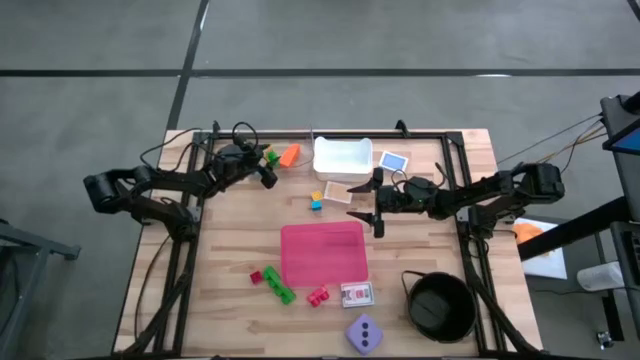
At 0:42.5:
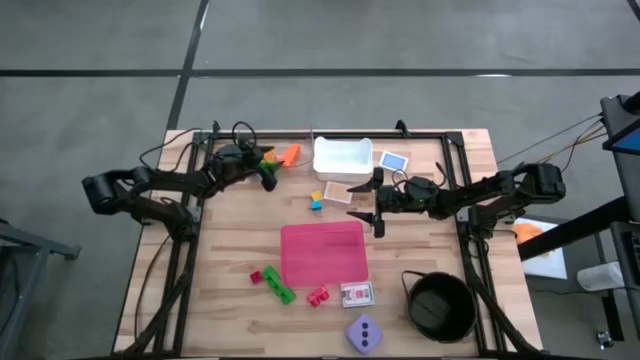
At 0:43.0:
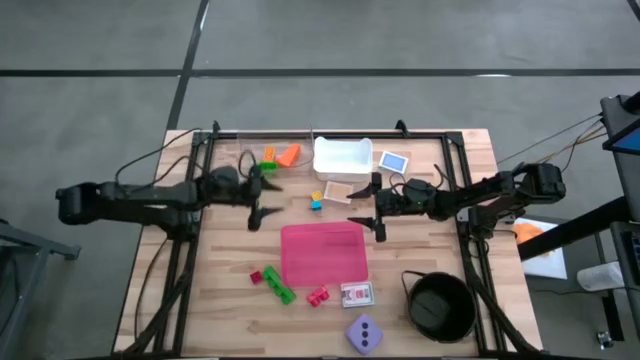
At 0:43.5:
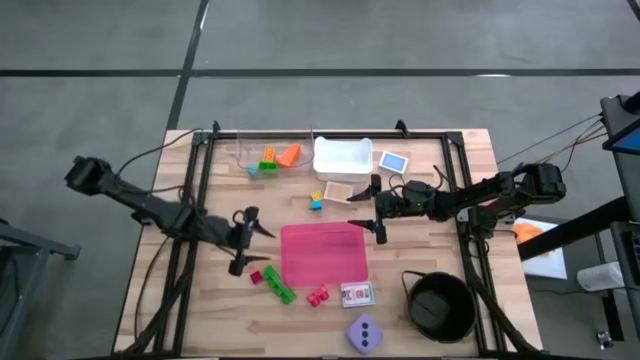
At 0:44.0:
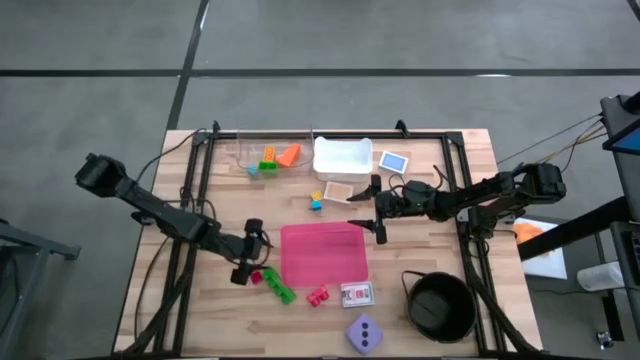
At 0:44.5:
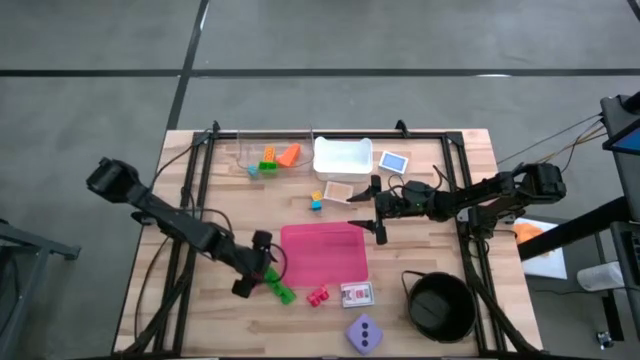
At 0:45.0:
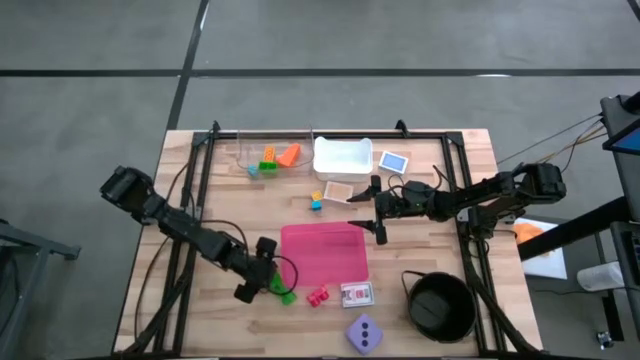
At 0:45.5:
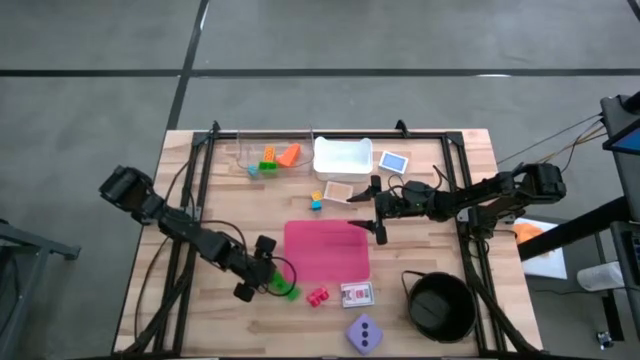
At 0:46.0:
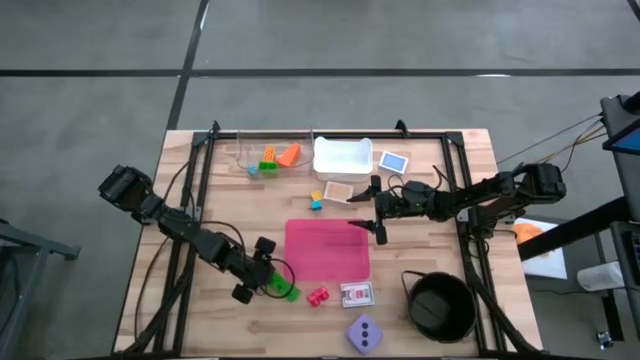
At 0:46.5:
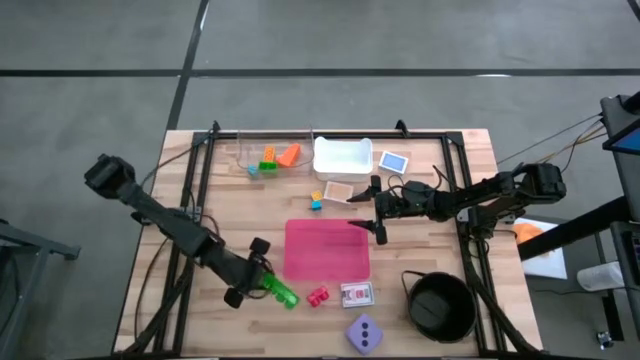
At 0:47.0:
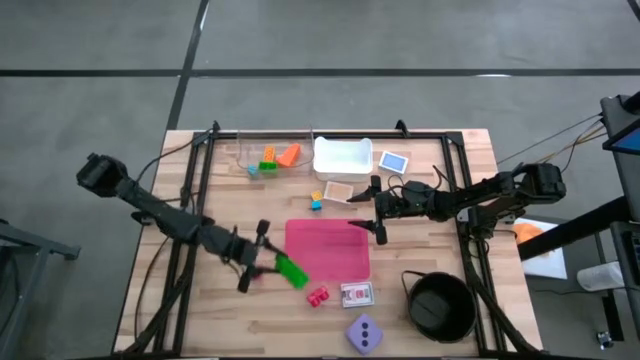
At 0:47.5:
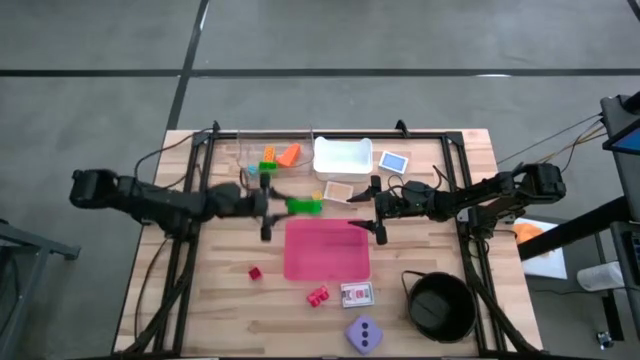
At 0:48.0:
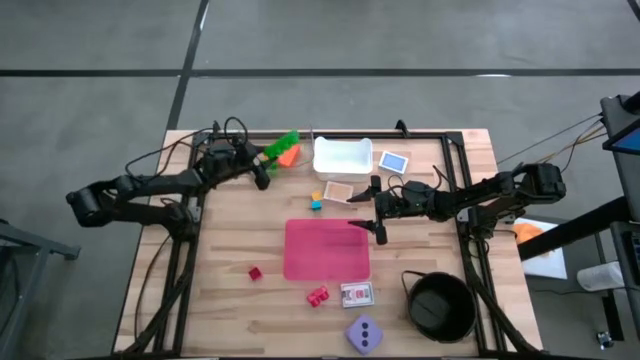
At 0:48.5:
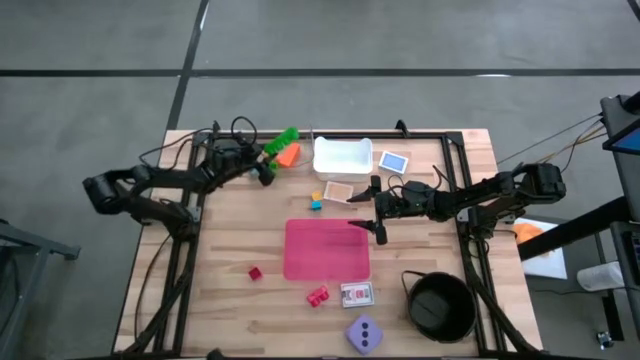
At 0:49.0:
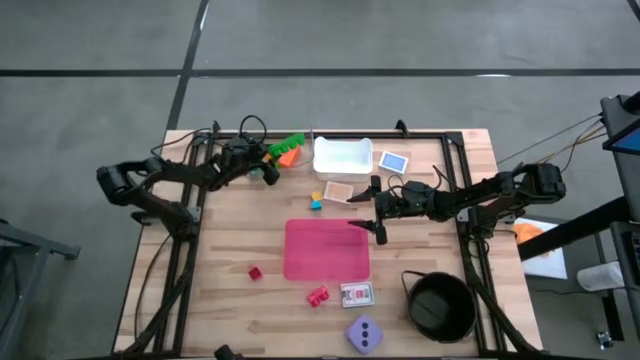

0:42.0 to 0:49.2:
Task: Pick & Place Toys
Put the green game piece into the transparent bin

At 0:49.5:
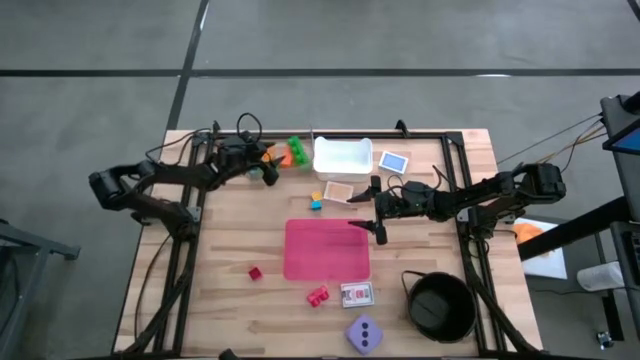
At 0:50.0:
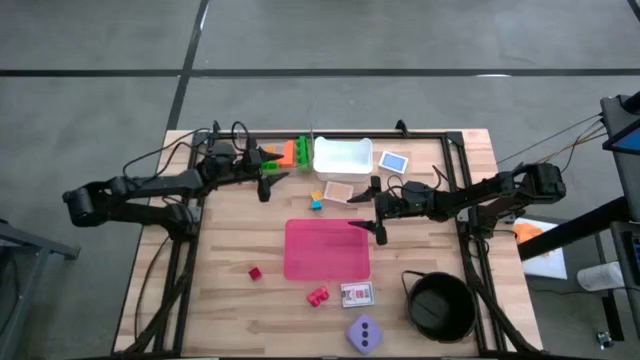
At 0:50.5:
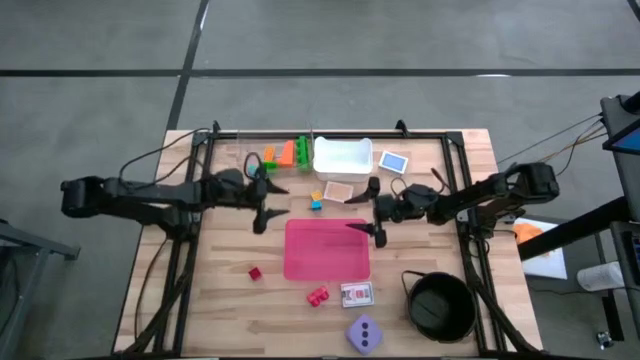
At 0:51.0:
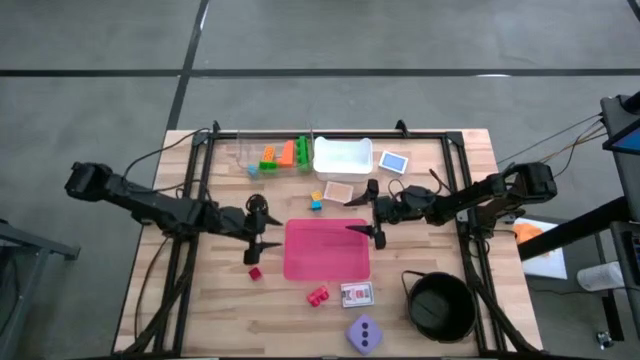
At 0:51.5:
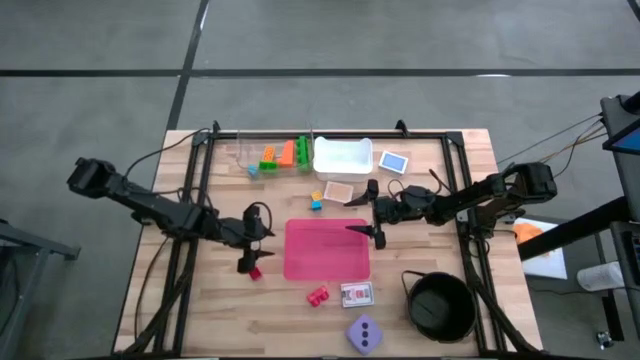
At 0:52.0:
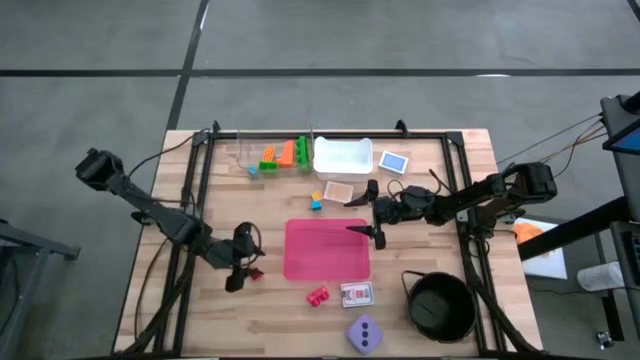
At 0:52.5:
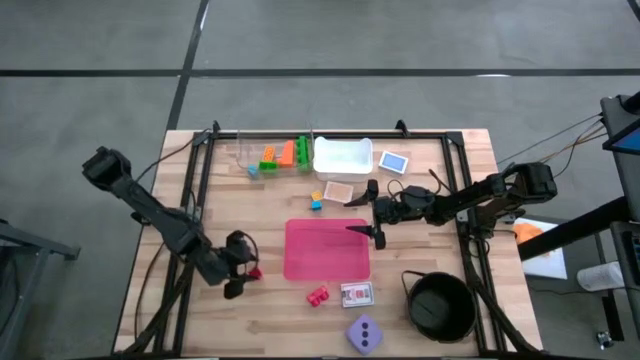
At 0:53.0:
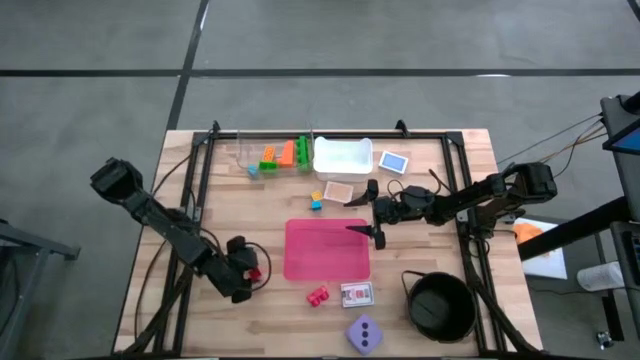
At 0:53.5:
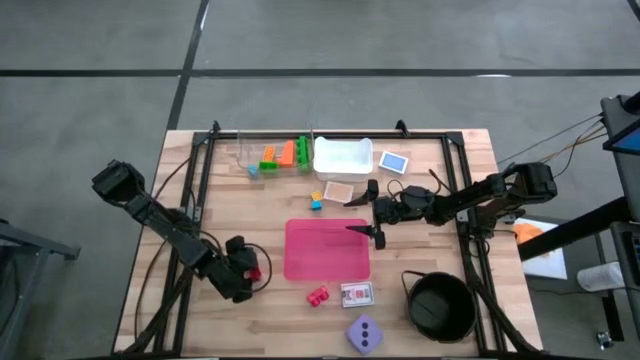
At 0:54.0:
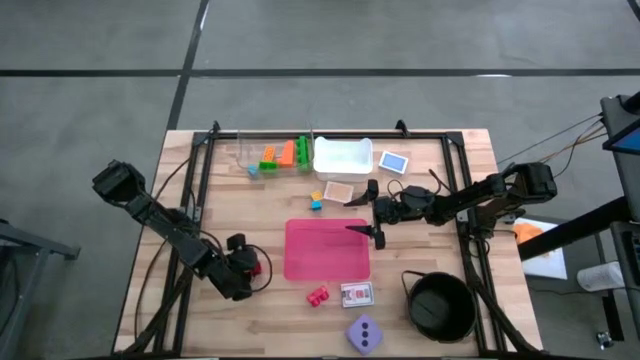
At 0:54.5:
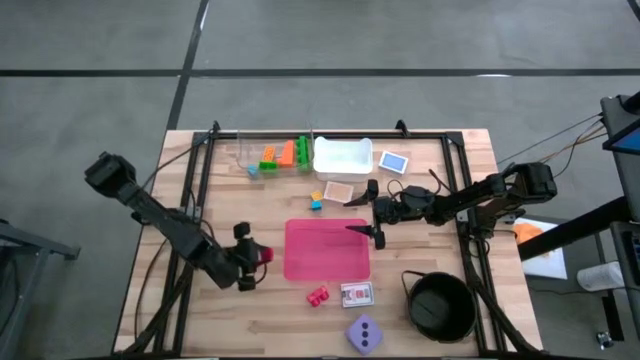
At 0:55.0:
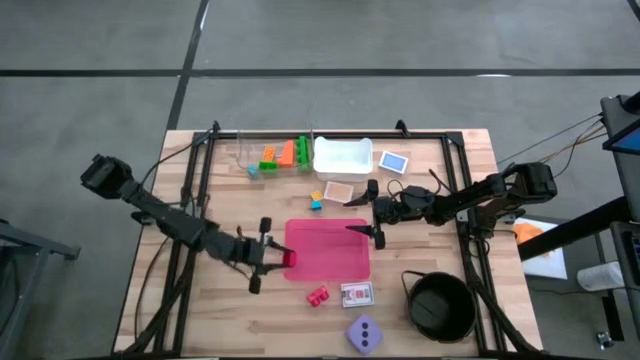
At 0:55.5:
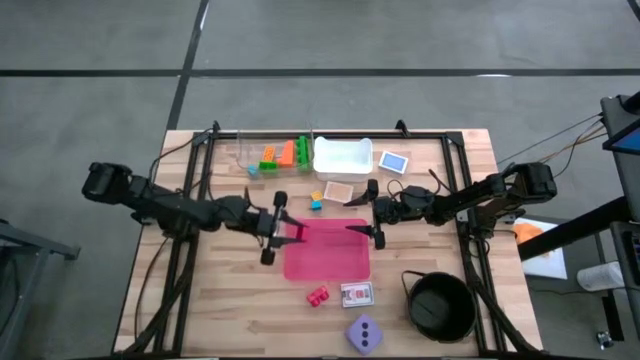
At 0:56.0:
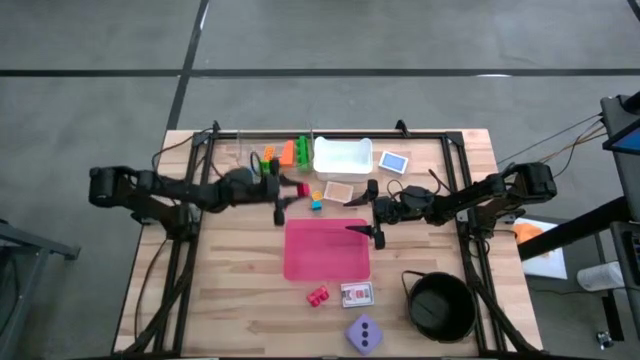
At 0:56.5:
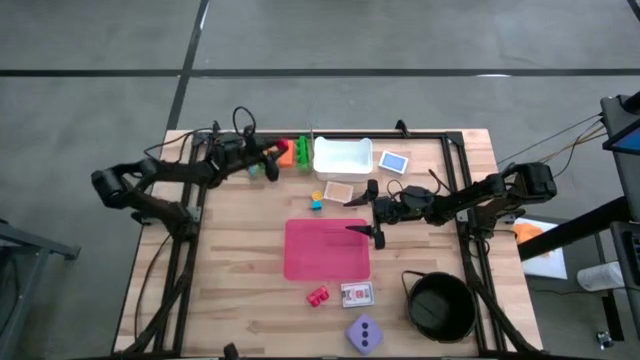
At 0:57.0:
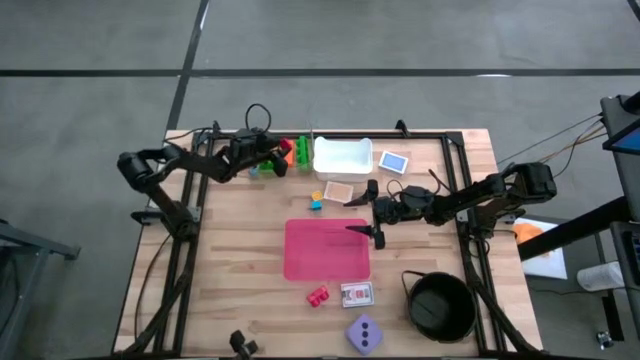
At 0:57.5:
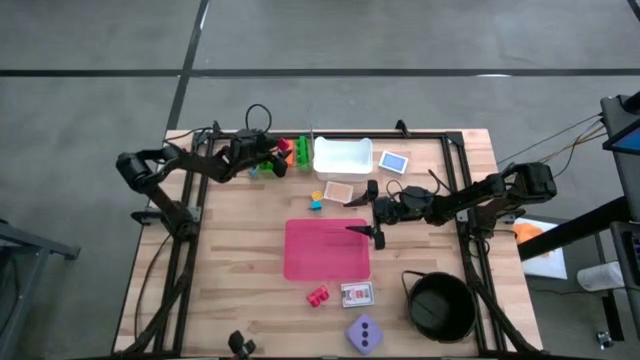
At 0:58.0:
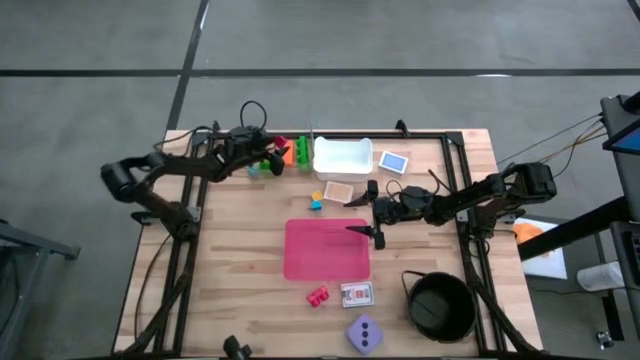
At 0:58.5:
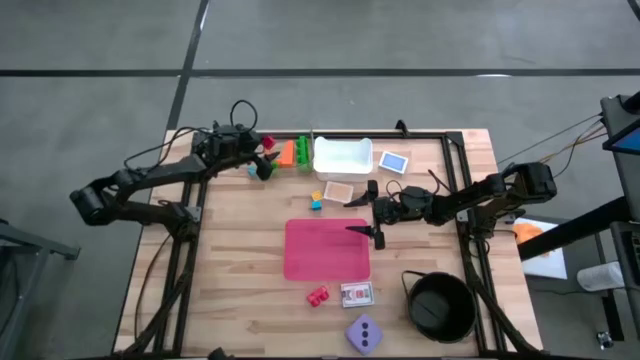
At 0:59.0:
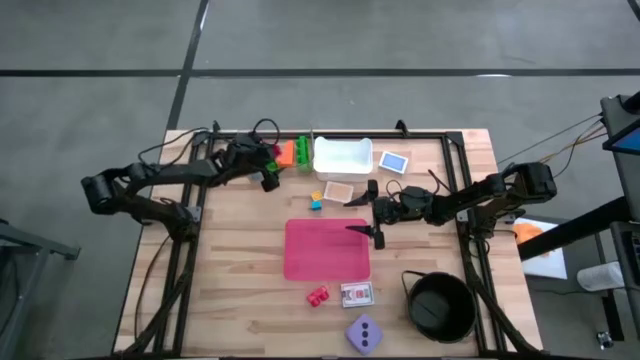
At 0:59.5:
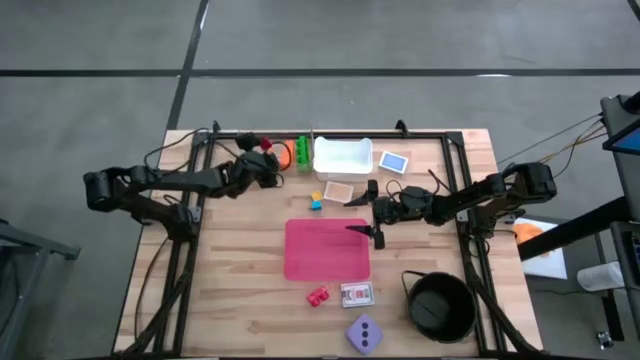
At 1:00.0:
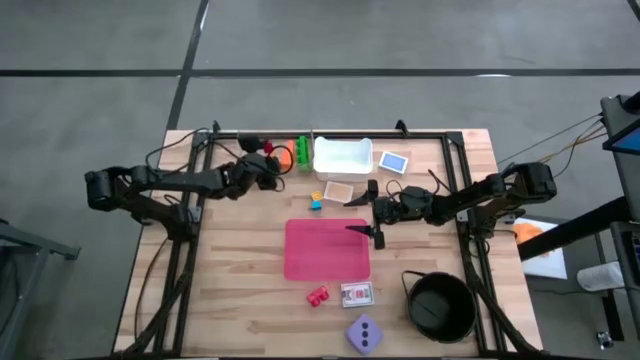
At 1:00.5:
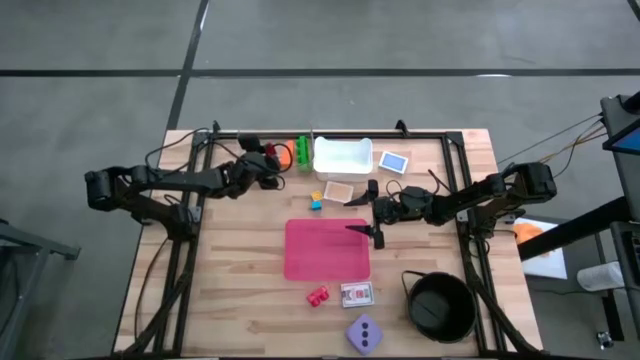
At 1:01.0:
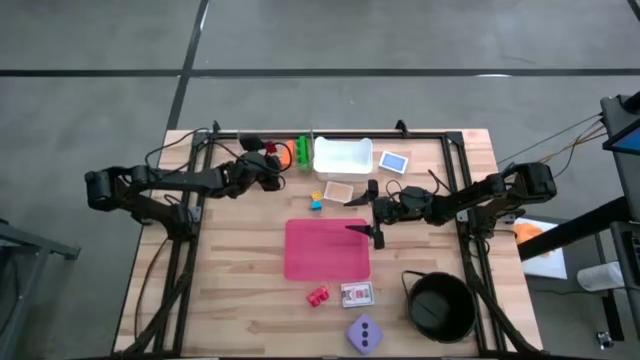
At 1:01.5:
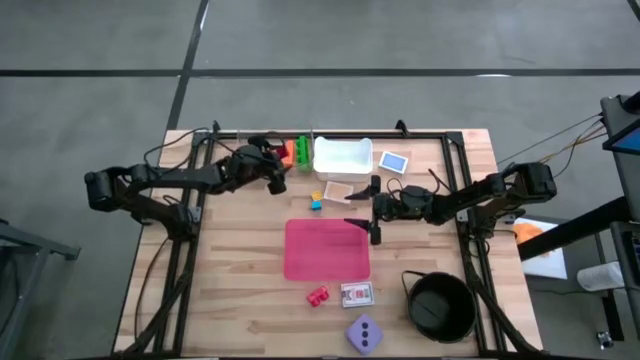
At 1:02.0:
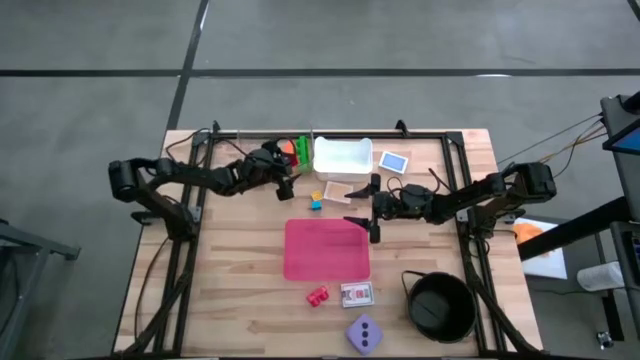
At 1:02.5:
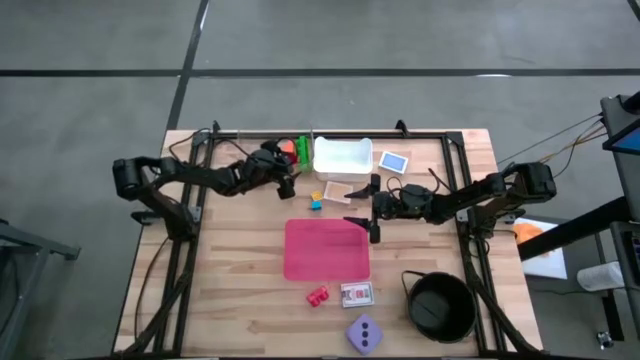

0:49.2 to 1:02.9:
Put the left red game piece into the transparent bin

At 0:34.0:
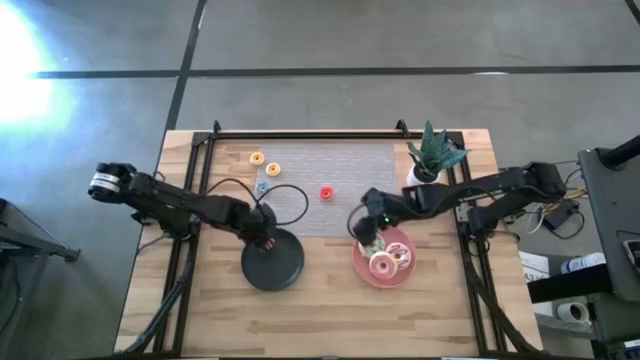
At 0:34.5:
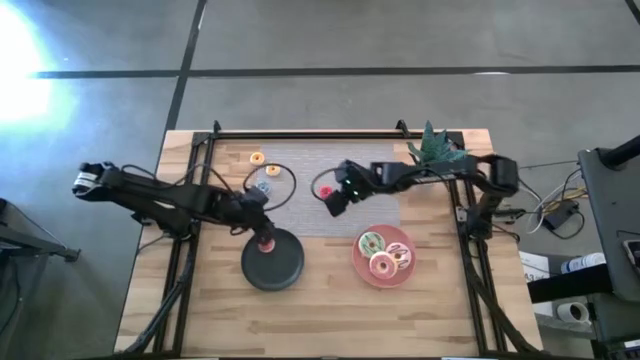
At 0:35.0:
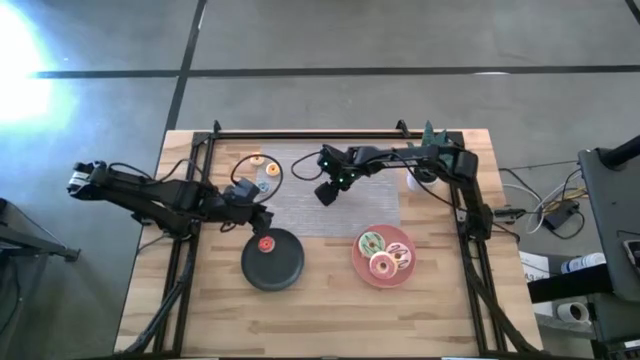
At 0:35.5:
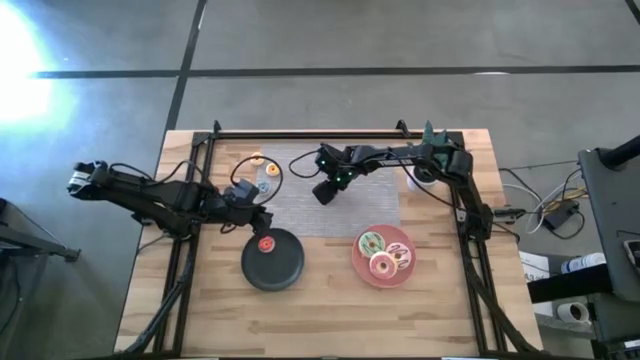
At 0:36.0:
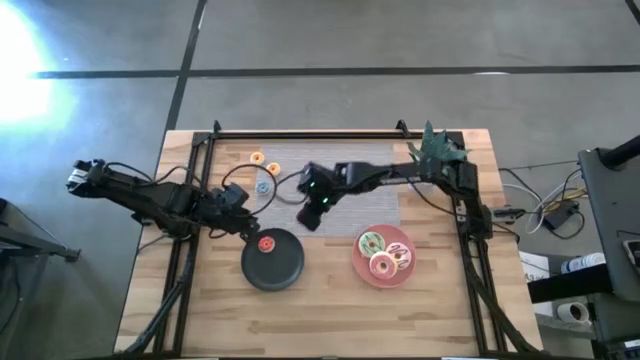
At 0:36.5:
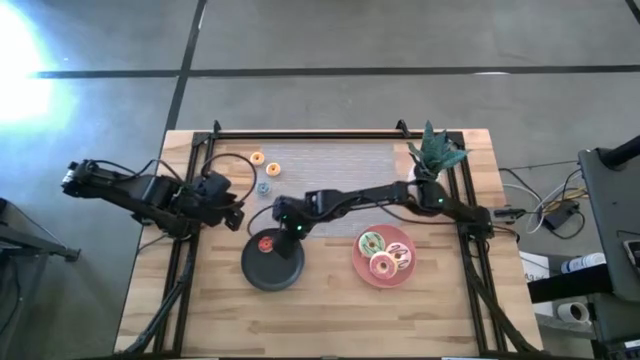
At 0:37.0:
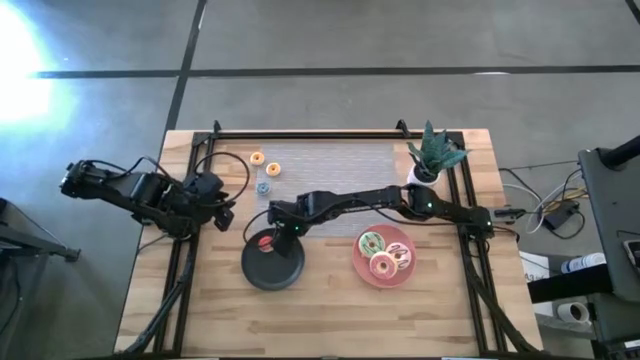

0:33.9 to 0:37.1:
Task: Pick & Place donuts
Put the small red donut on the black plate
